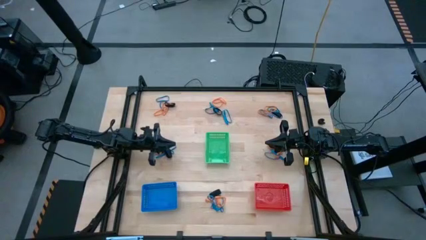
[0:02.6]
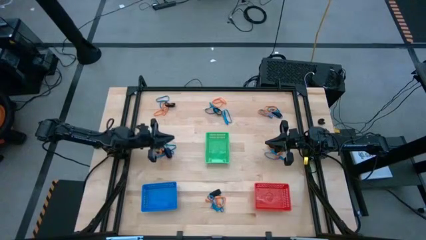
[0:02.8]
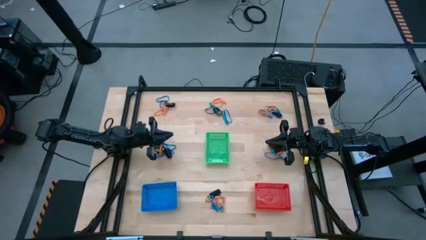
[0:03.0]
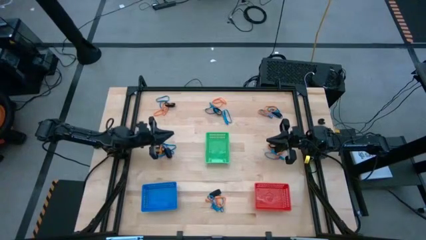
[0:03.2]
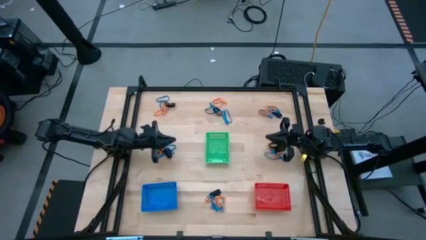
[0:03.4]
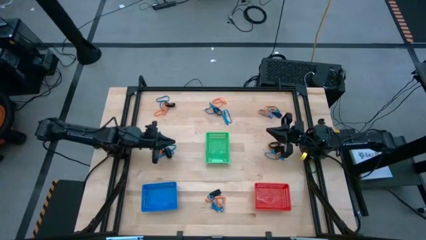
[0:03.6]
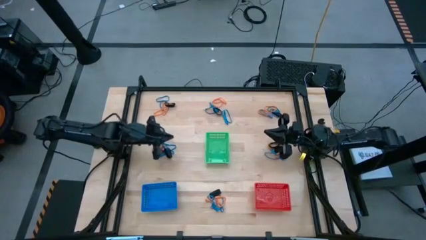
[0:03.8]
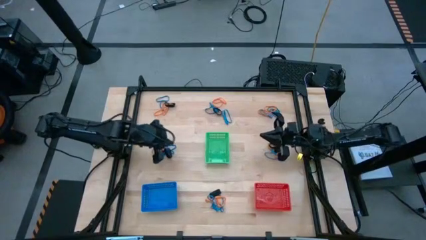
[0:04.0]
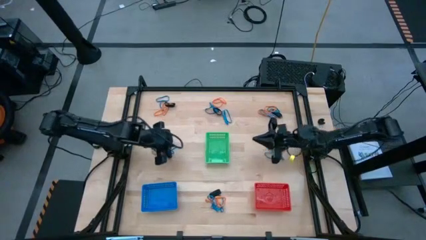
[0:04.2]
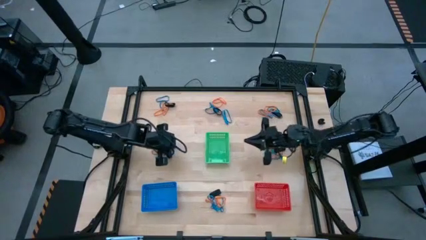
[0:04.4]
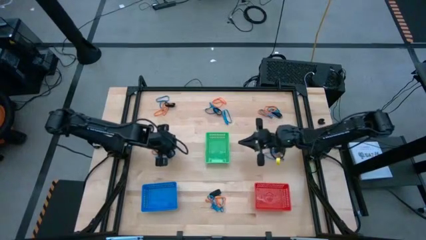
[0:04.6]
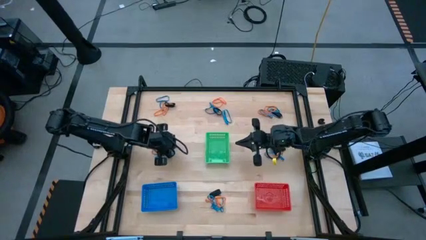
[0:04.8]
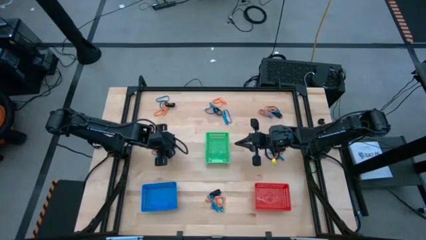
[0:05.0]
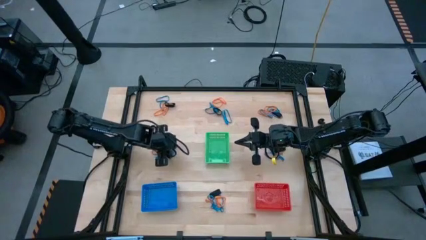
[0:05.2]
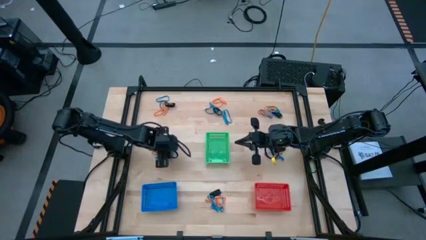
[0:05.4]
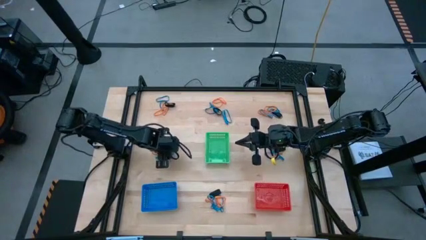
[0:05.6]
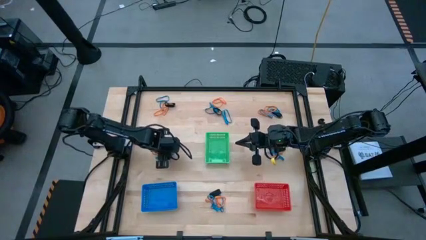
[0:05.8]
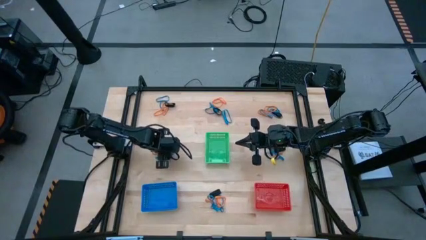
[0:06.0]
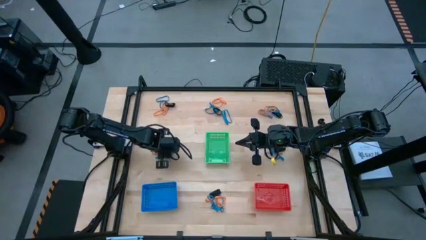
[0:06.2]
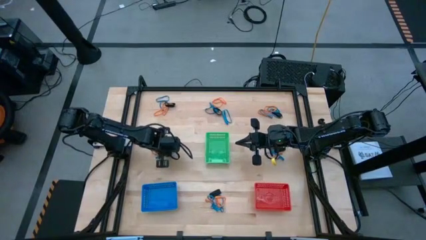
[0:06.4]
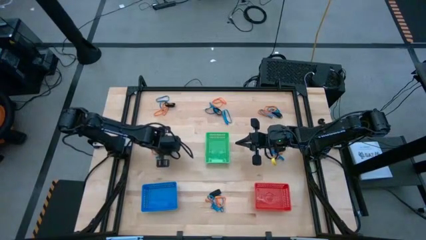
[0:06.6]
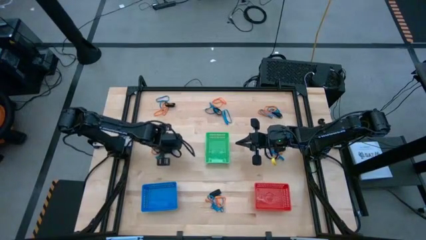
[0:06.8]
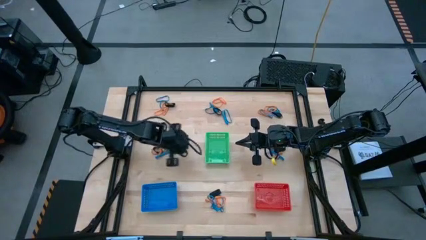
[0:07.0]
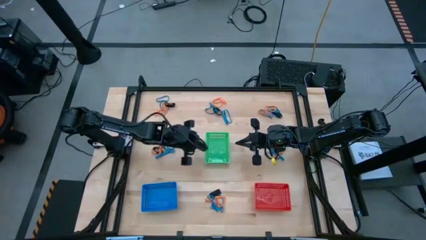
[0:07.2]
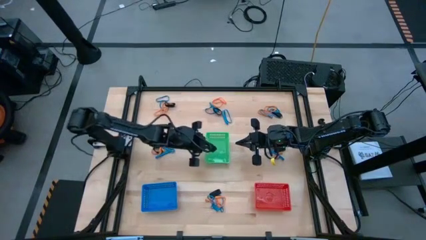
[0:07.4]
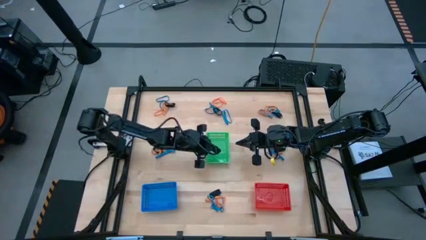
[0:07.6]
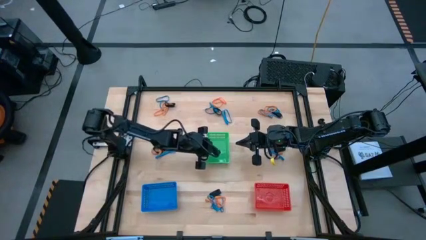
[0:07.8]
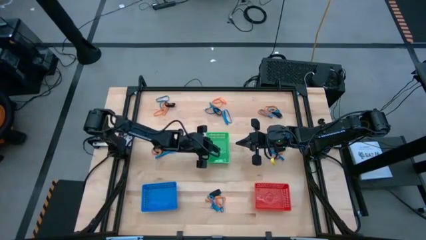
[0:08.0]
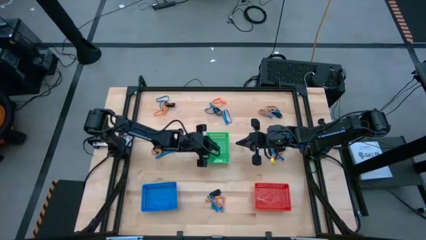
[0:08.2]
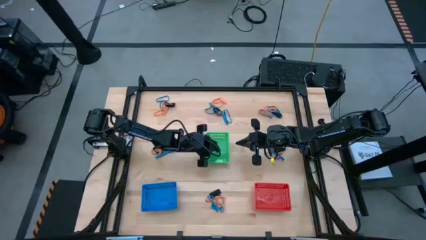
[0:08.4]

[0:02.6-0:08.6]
Task: Sort rubber bands into baskets
Put the black rubber band into the green bin

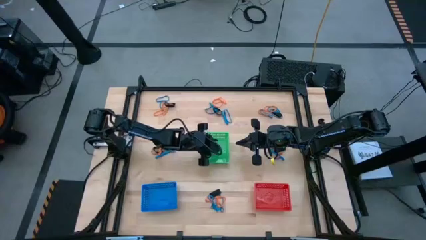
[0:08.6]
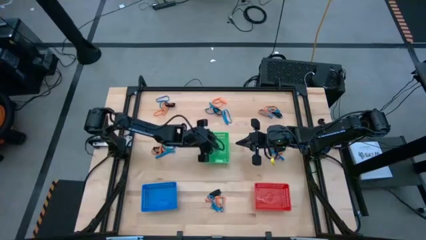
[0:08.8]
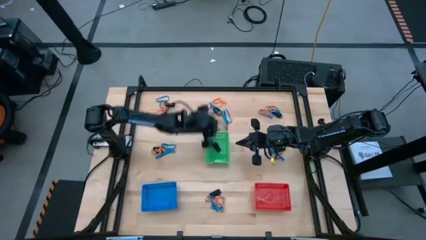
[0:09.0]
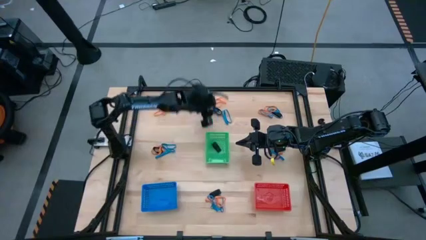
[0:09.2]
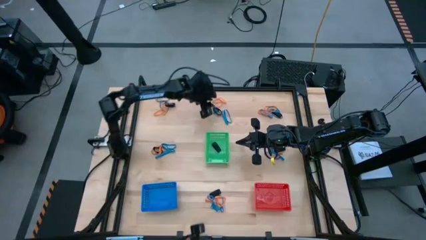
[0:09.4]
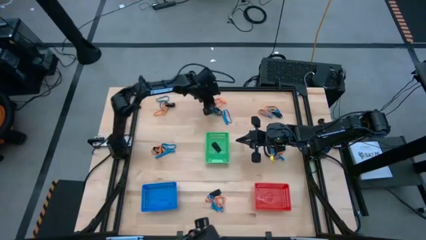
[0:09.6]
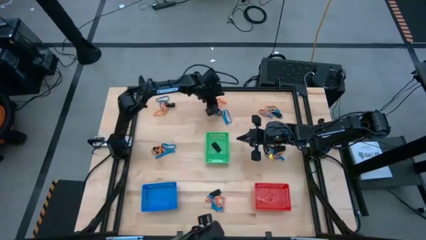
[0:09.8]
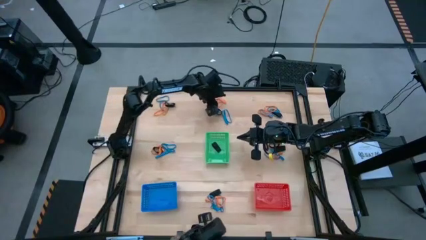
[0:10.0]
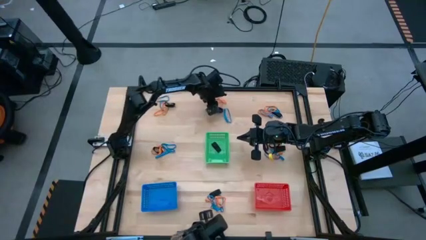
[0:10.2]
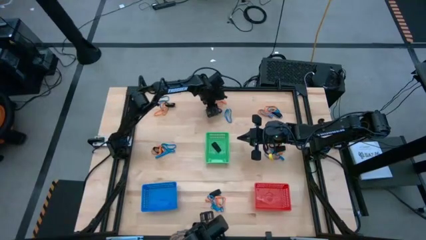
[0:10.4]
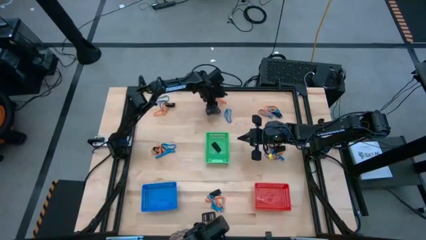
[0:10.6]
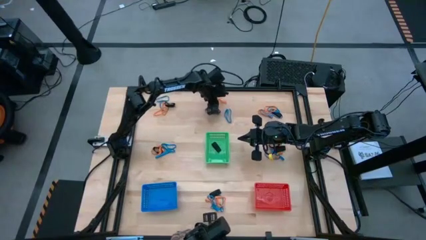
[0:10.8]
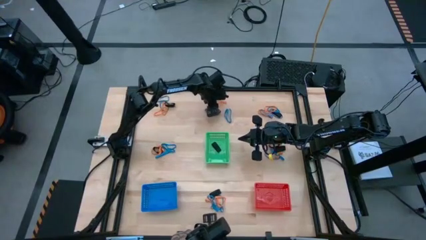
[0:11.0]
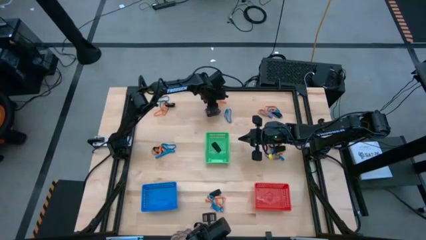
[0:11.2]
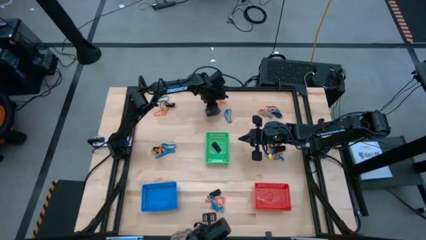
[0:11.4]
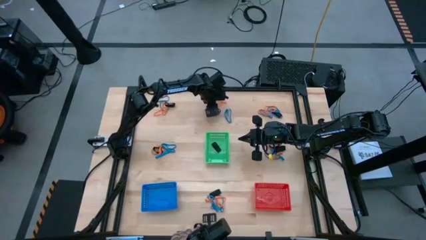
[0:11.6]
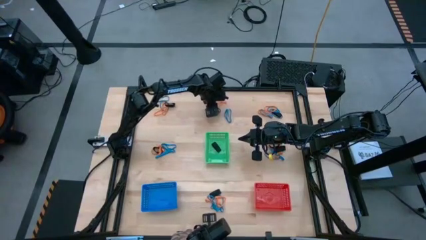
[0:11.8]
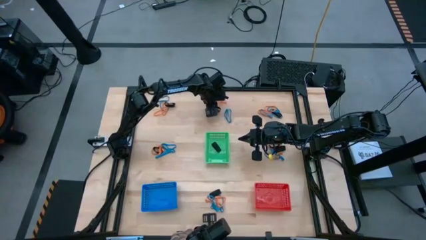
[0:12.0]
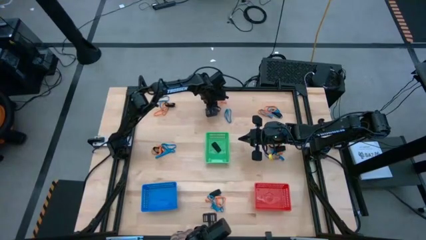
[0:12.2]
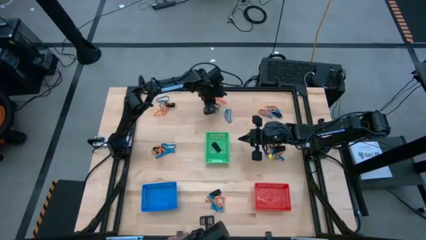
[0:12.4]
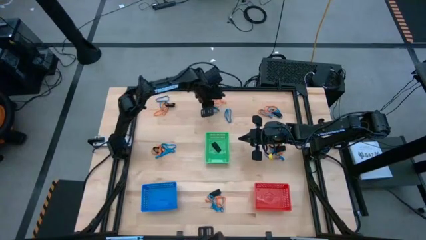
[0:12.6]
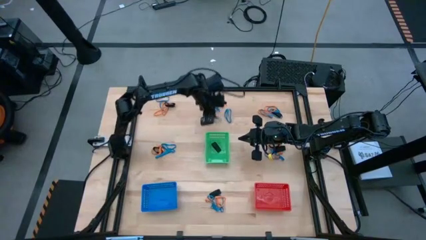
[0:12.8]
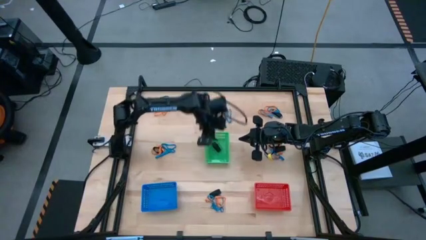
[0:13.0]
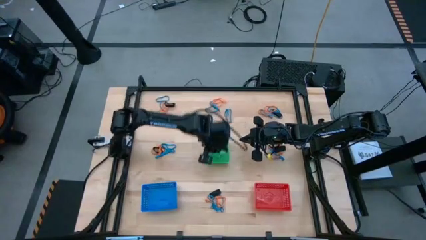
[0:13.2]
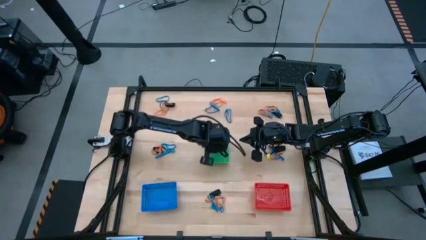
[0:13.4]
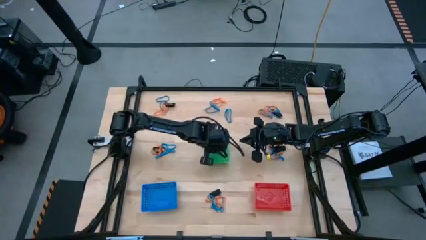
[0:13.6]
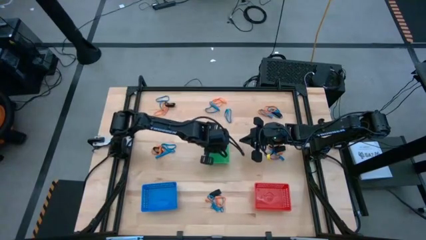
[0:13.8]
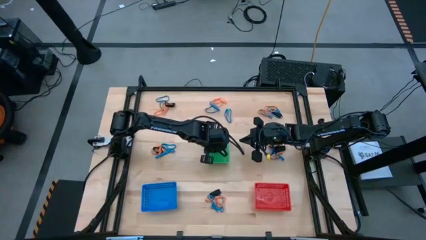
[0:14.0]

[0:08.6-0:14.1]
Put the black rubber band into the green bin

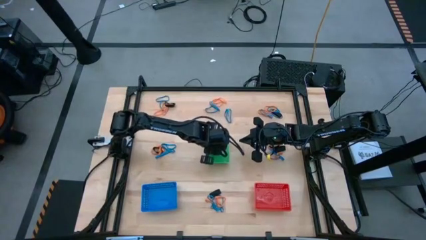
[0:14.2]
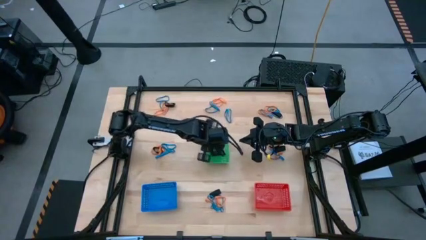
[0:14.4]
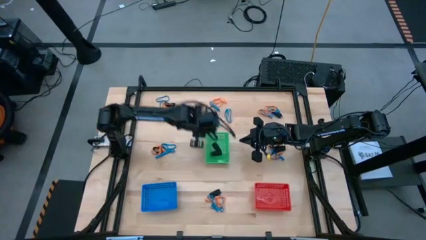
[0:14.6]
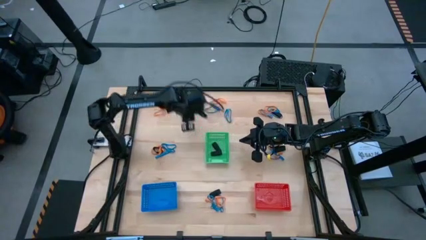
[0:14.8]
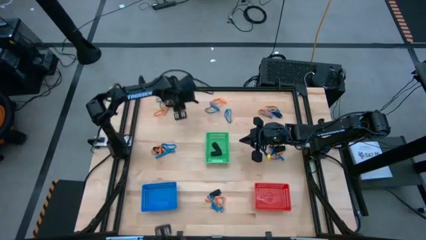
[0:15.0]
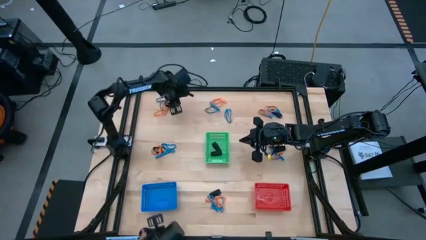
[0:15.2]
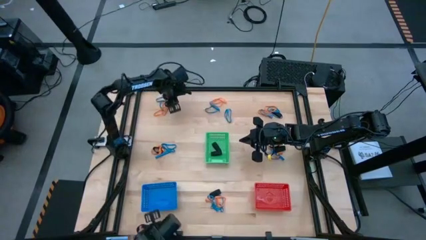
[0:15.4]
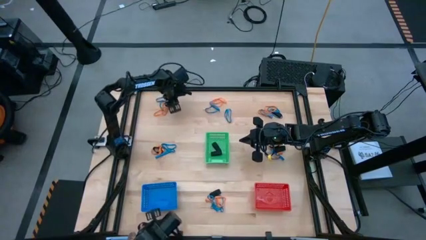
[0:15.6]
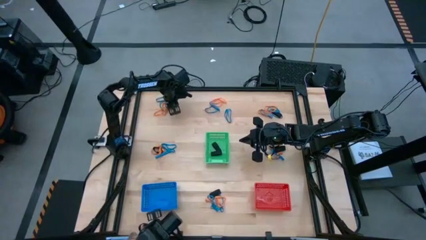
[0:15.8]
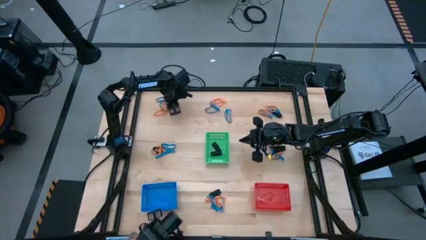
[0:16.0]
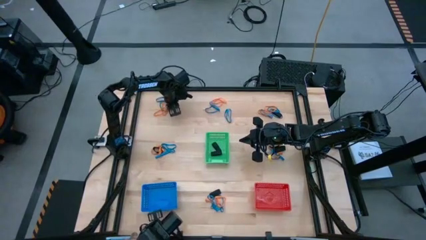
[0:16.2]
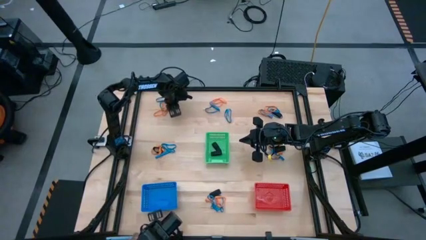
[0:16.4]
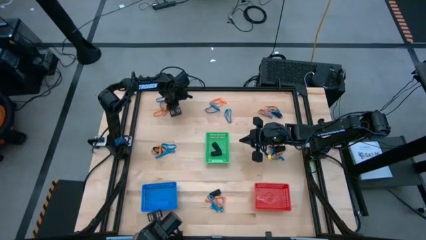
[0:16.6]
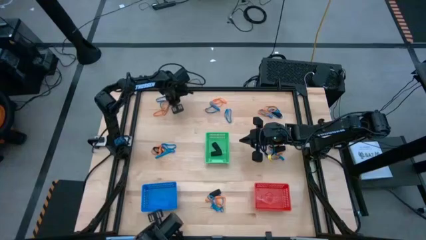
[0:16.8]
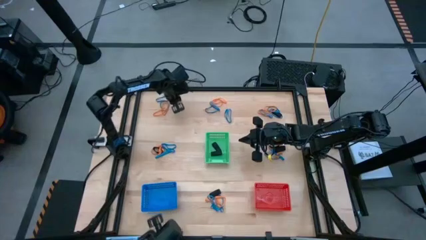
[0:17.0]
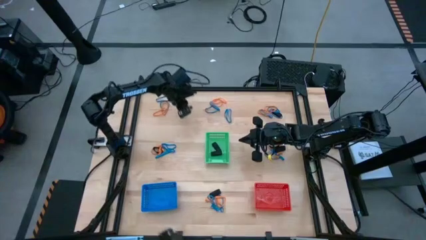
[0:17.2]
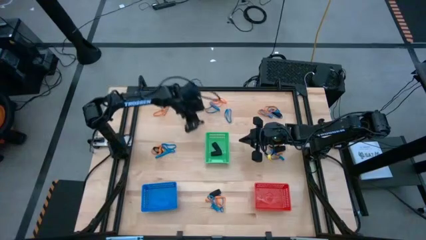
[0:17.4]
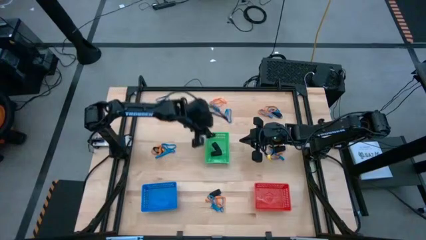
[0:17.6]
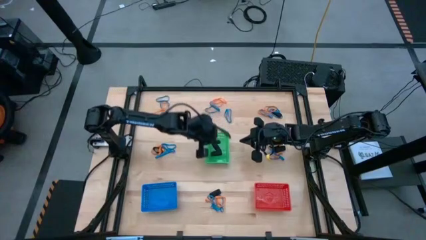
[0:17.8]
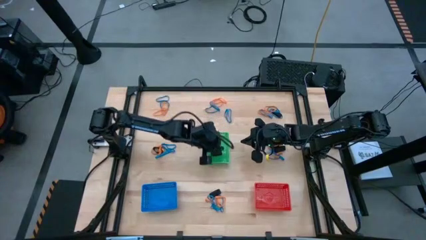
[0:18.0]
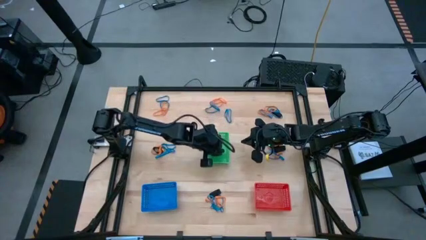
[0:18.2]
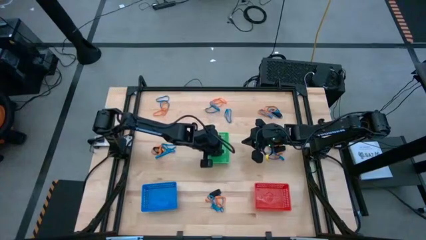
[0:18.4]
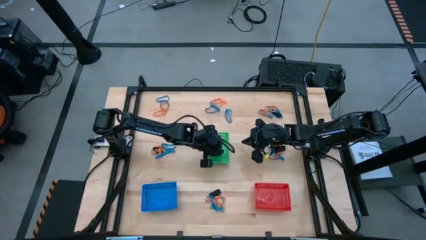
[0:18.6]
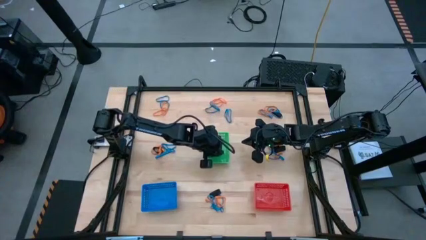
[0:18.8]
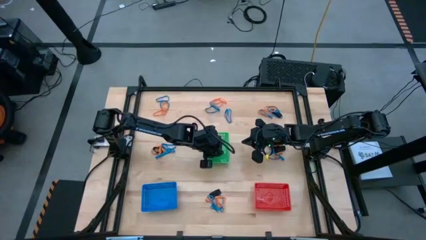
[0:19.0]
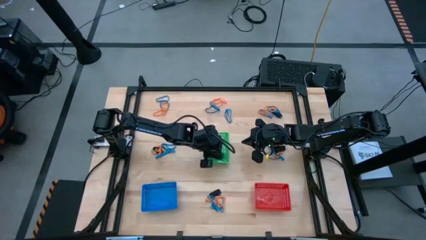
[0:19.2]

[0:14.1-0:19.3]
Put the black rubber band from the top left into the green bin
